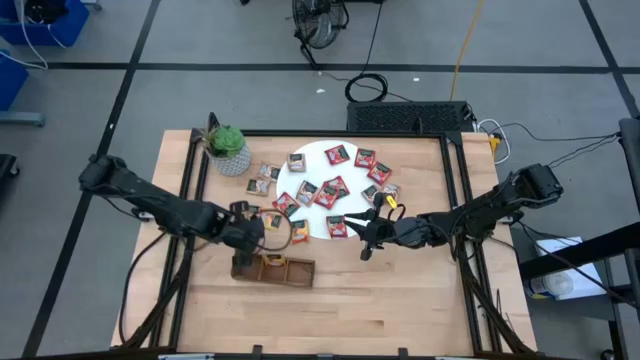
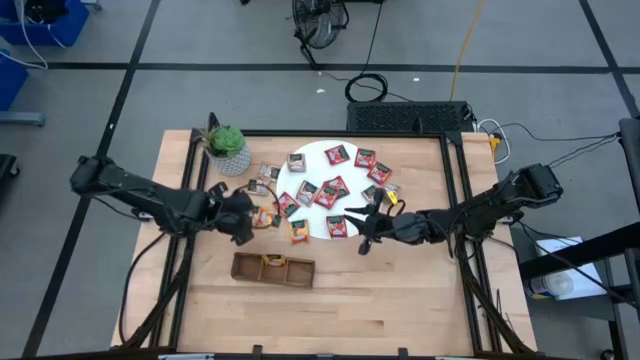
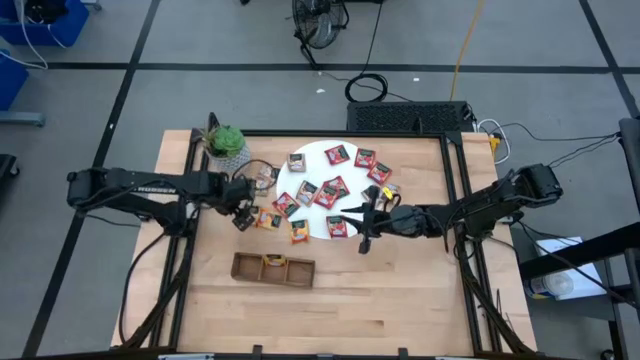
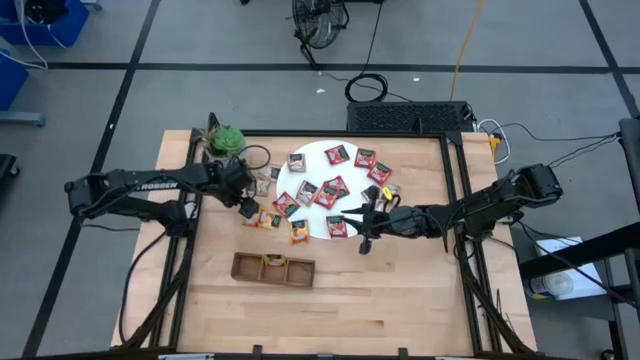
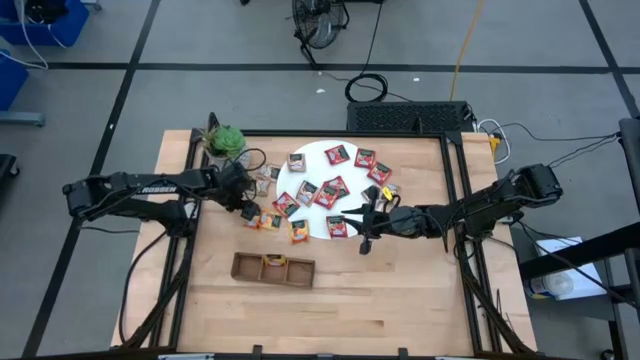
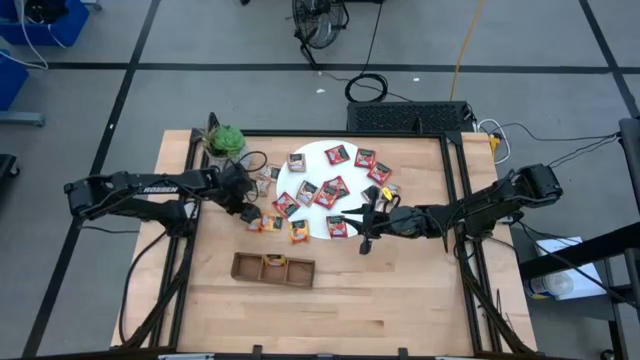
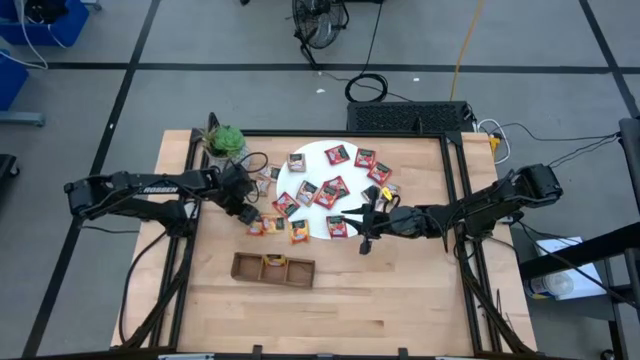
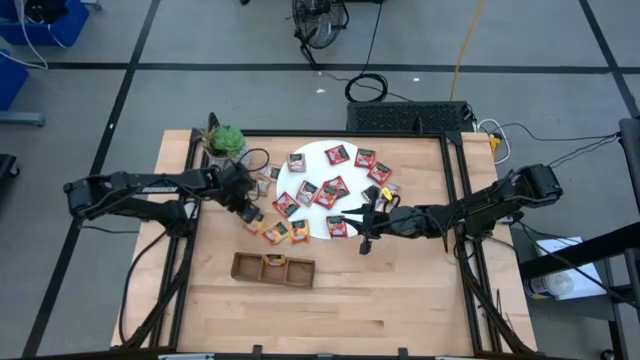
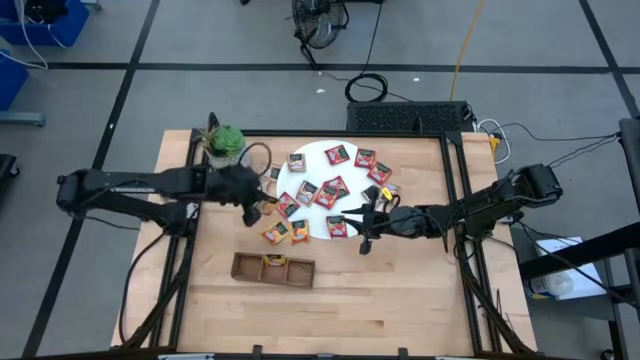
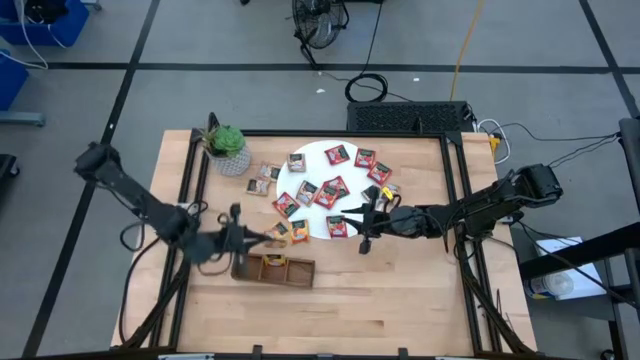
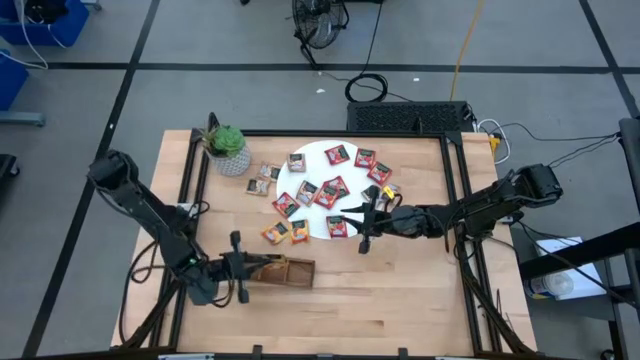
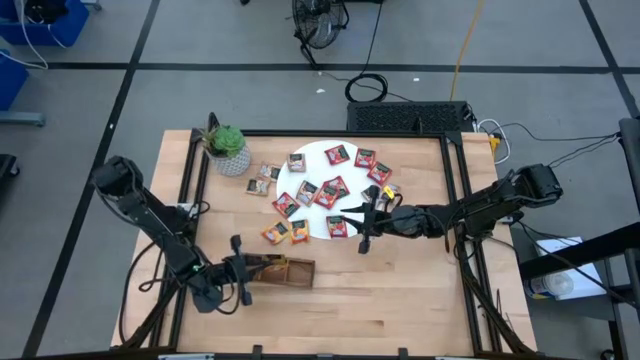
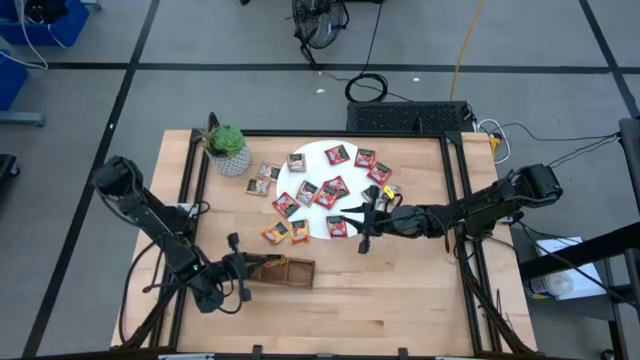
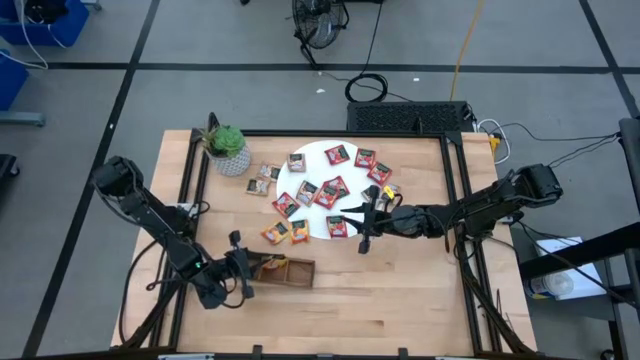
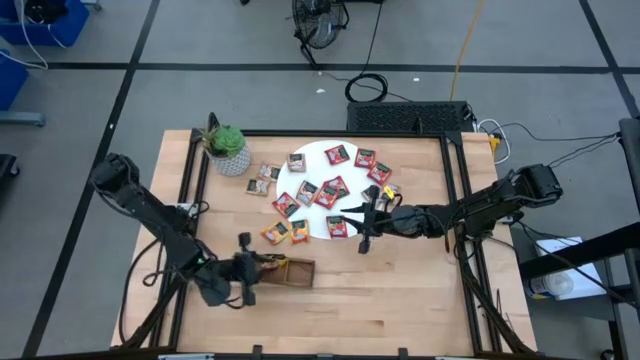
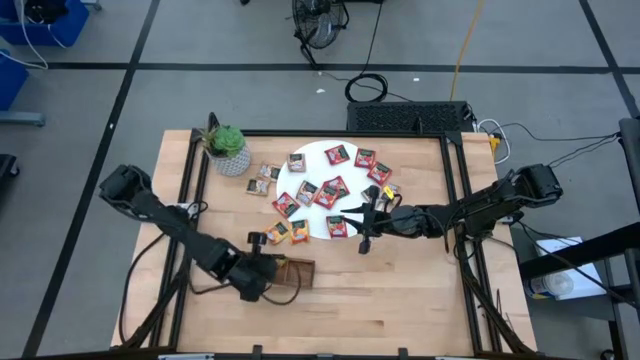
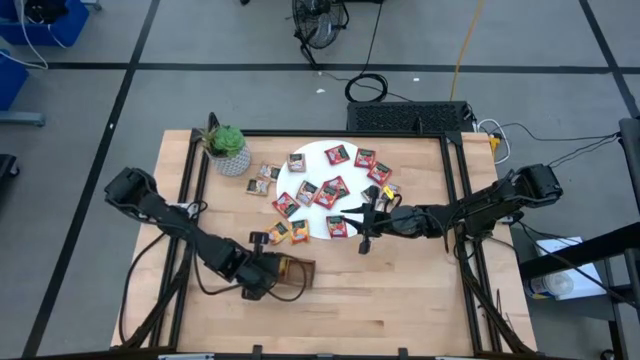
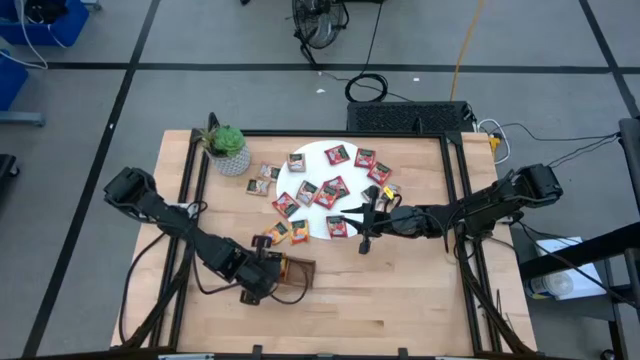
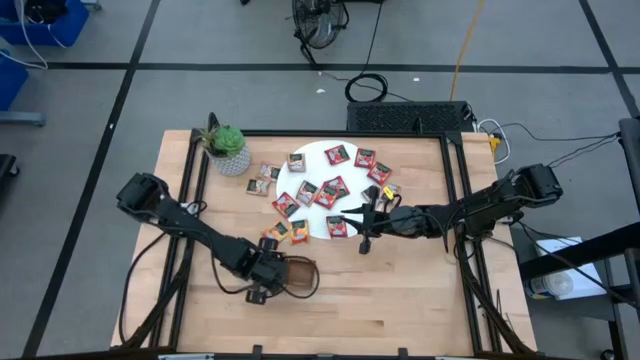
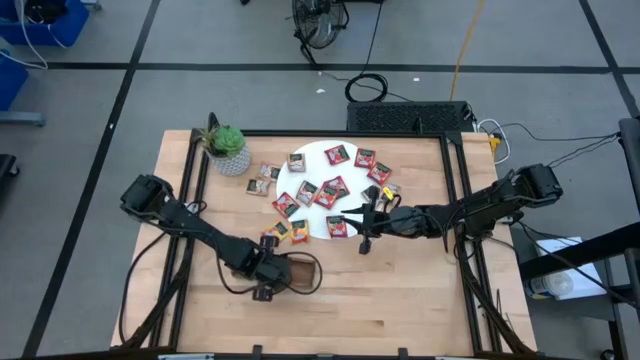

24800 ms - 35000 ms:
Task: Pick & Place Tea
Put the orange tea bag into the middle section of the wooden organizer

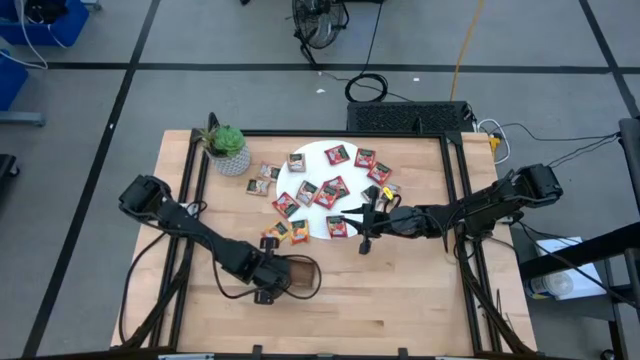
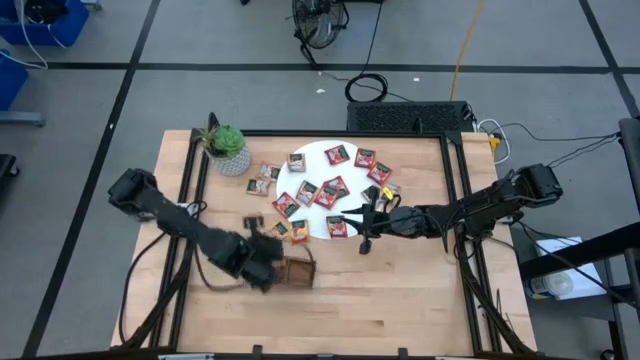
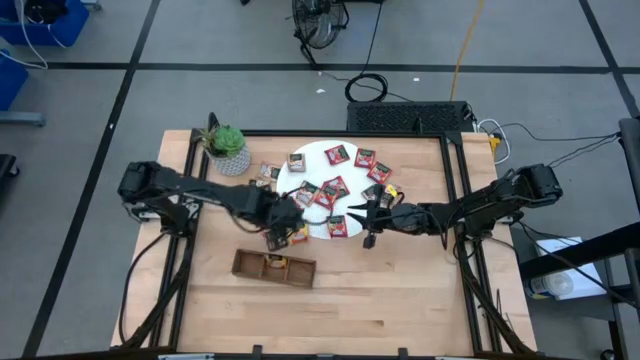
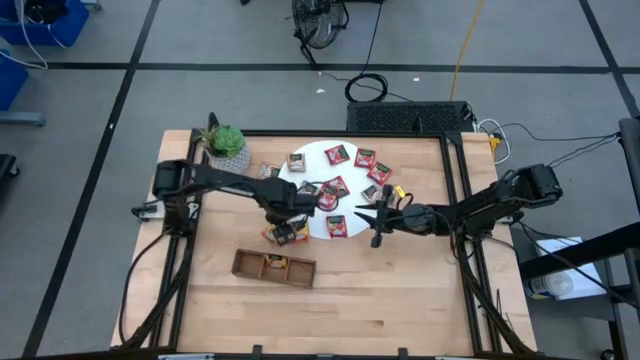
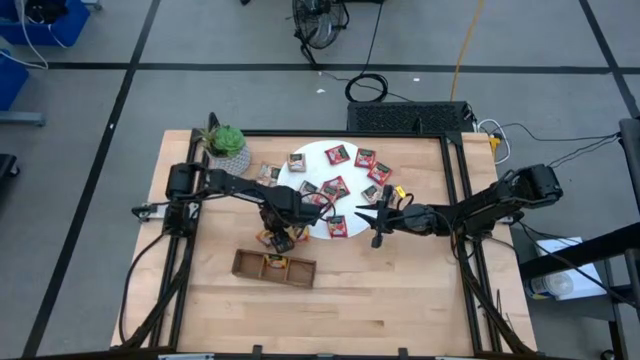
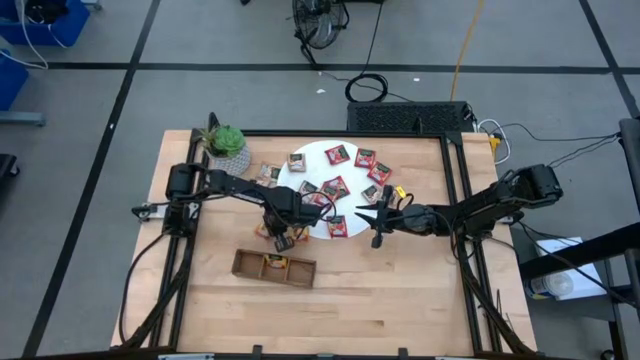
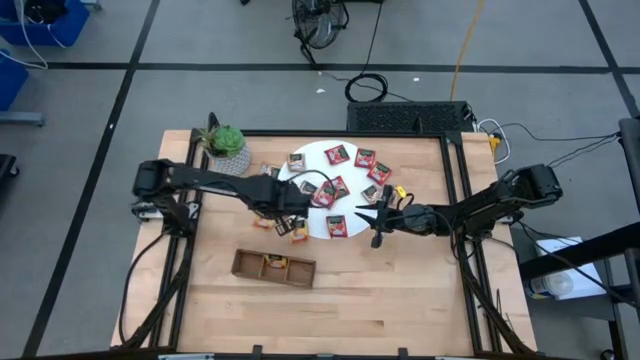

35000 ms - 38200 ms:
Put the orange tea bag into the middle section of the wooden organizer

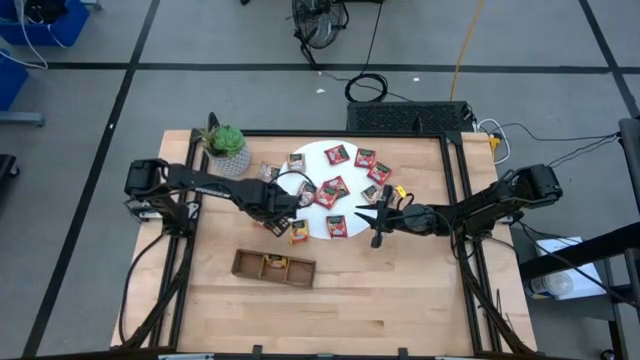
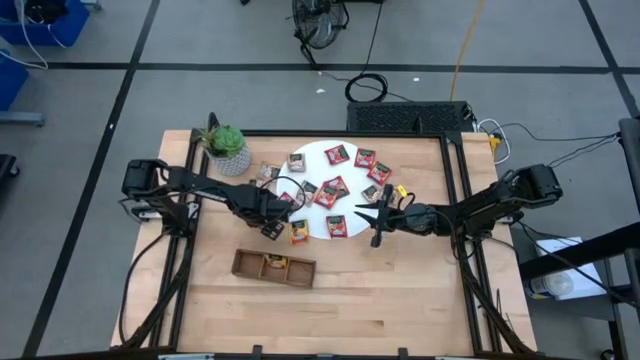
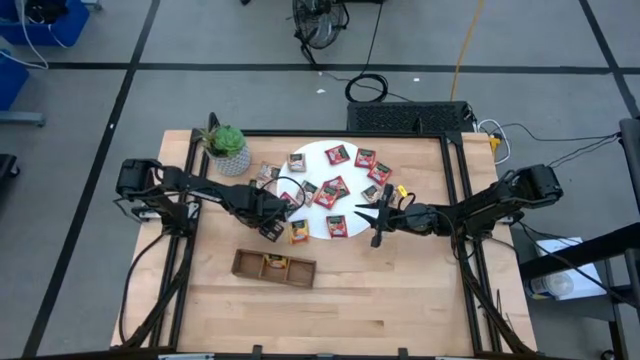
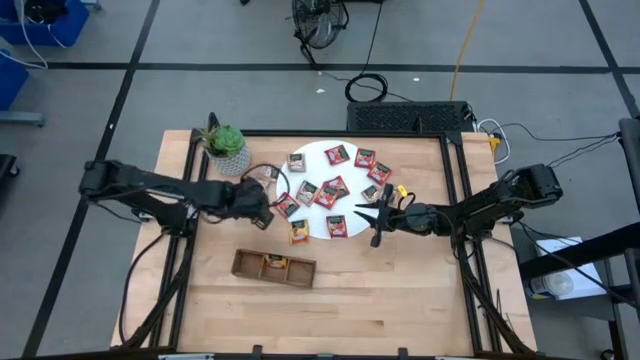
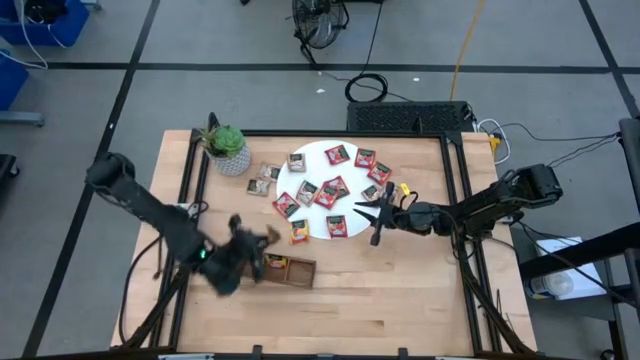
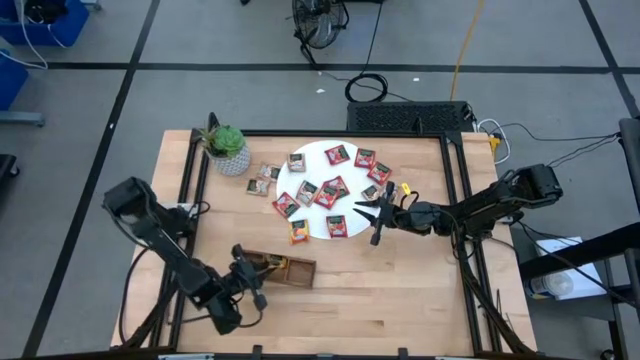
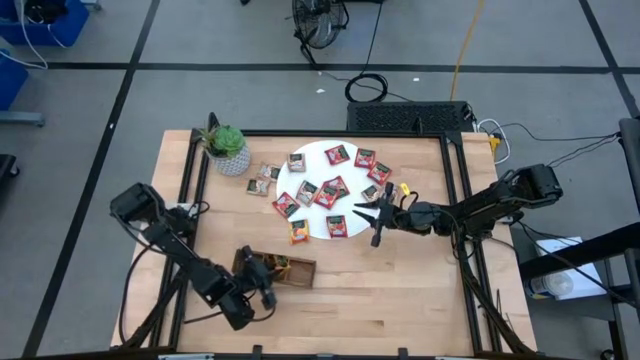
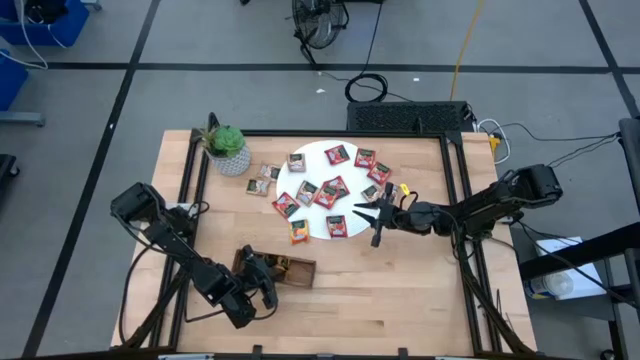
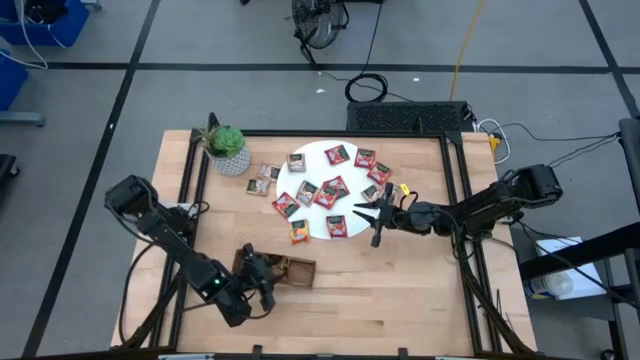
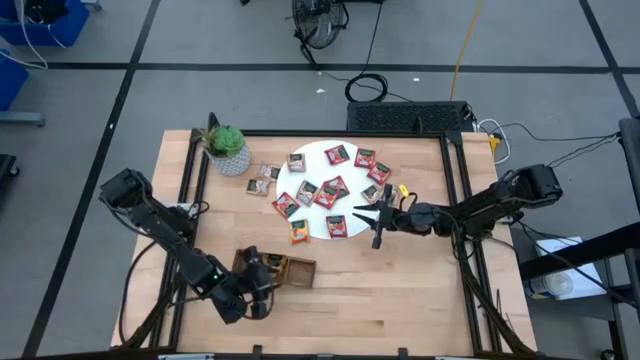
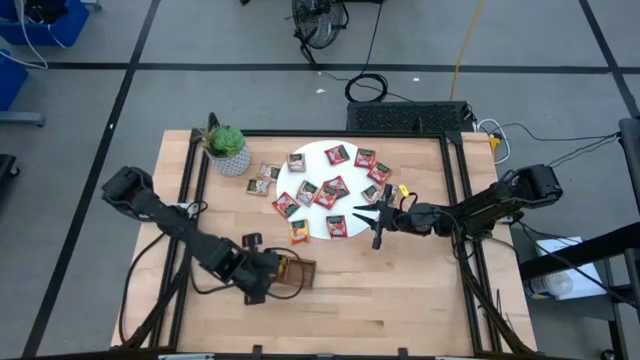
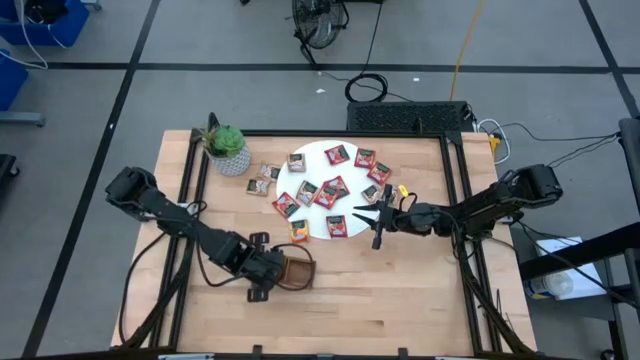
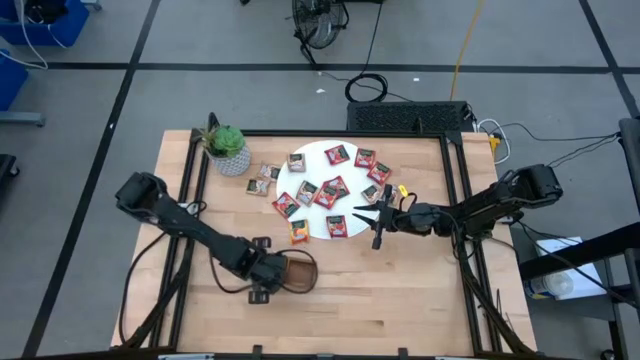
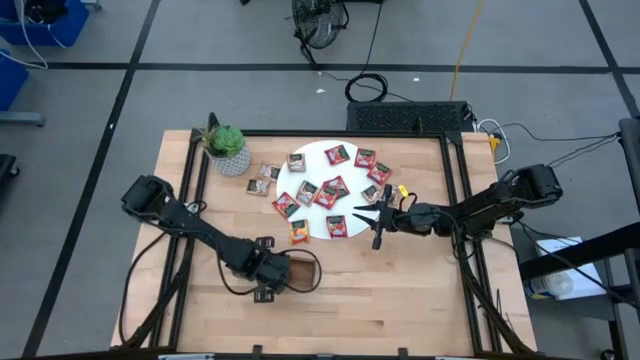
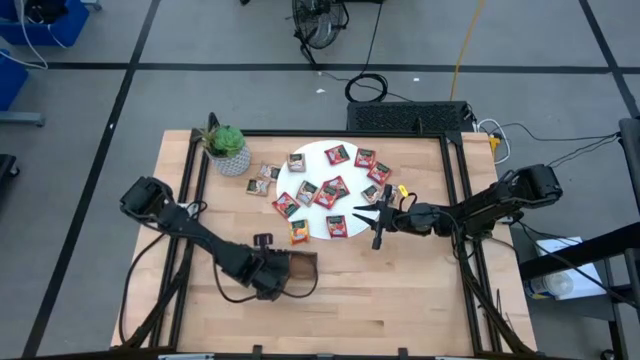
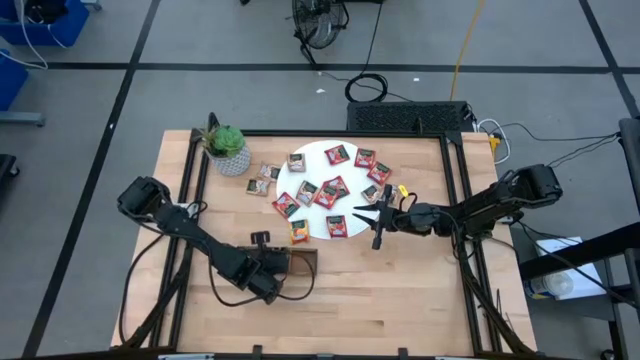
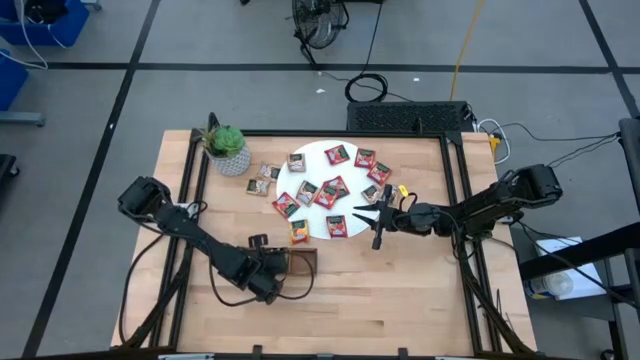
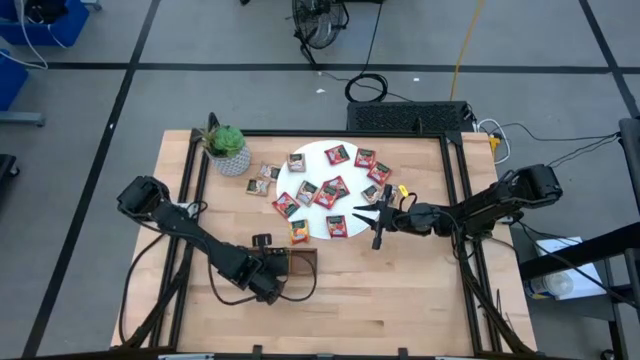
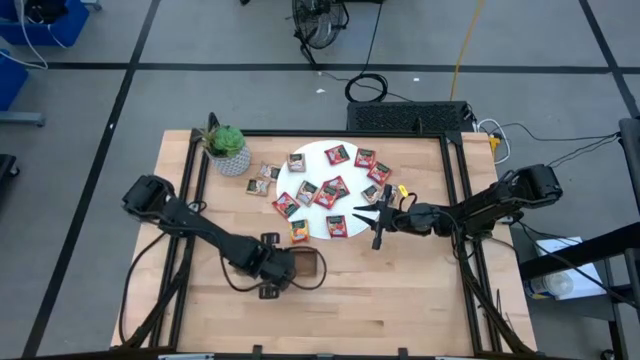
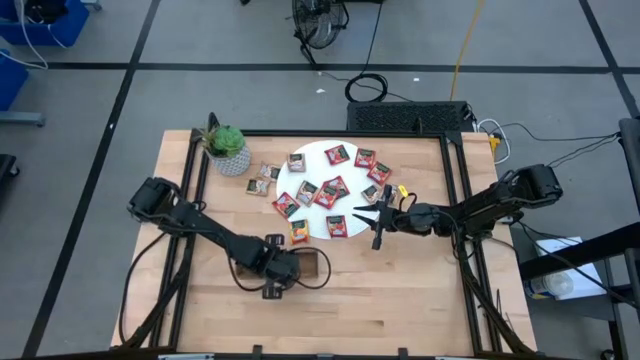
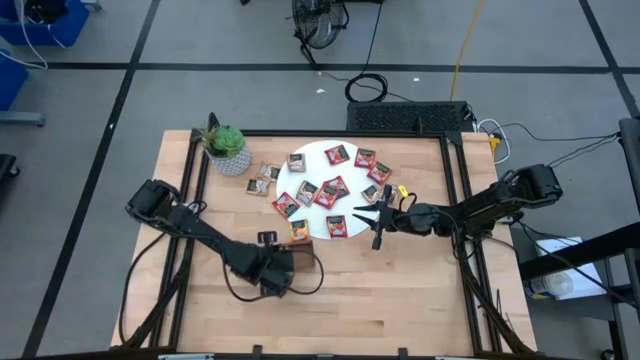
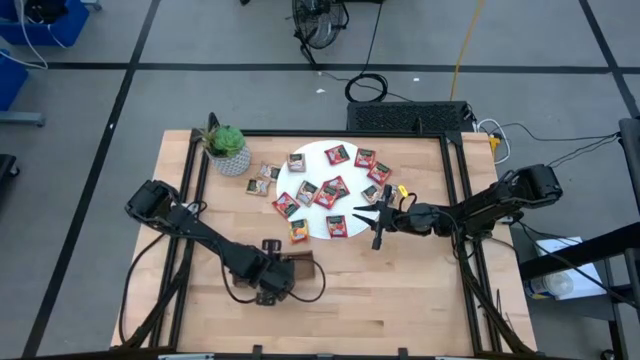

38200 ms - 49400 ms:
Put the orange tea bag into the middle section of the wooden organizer
